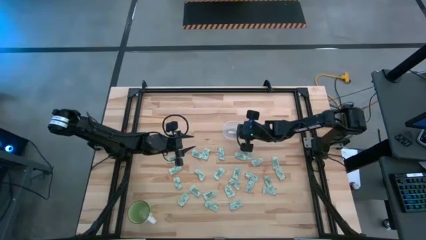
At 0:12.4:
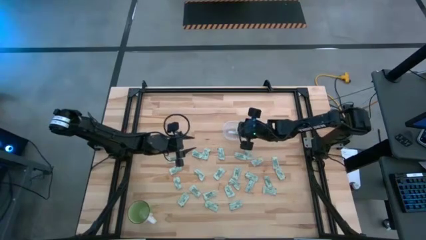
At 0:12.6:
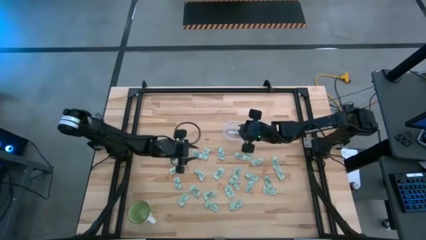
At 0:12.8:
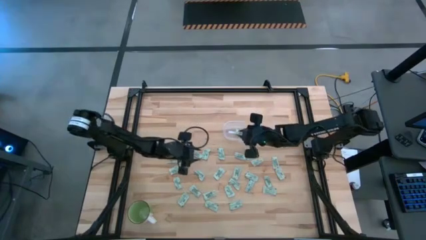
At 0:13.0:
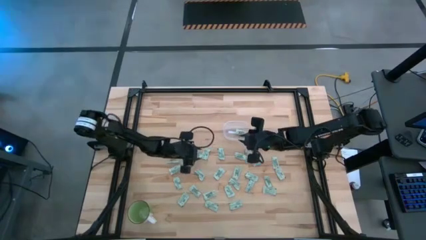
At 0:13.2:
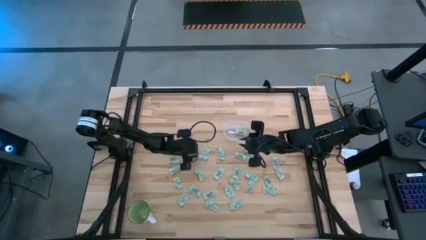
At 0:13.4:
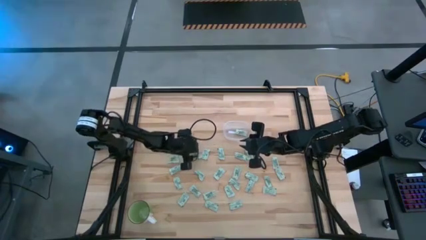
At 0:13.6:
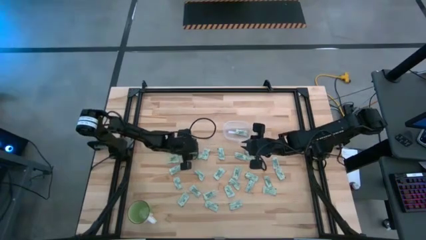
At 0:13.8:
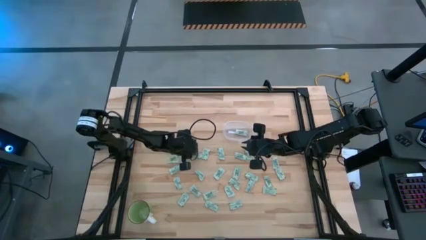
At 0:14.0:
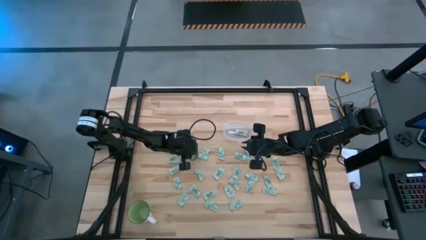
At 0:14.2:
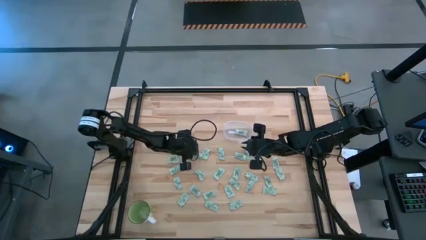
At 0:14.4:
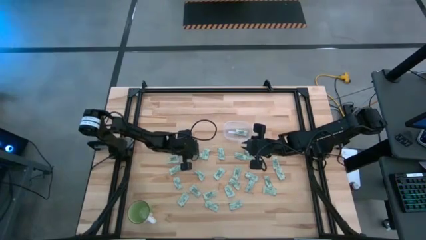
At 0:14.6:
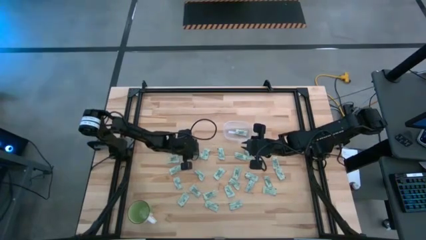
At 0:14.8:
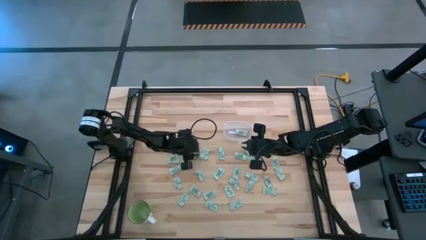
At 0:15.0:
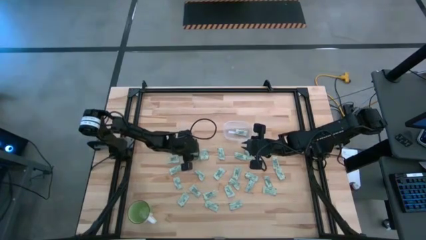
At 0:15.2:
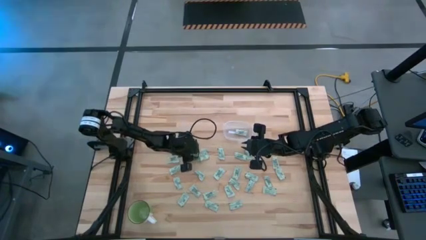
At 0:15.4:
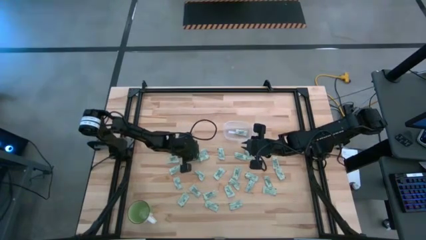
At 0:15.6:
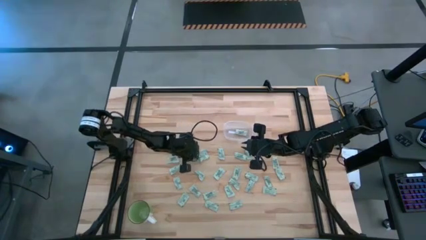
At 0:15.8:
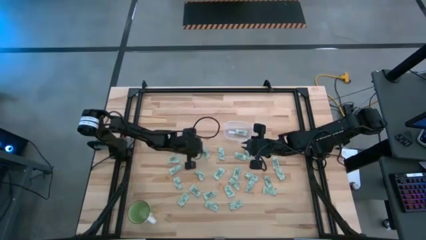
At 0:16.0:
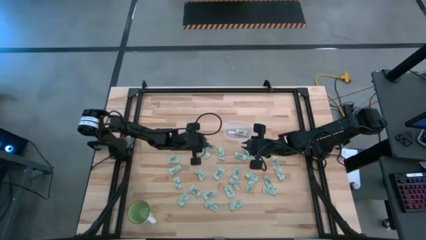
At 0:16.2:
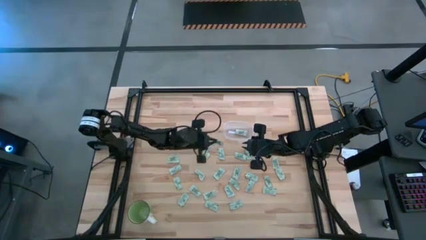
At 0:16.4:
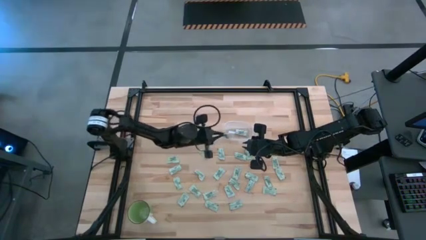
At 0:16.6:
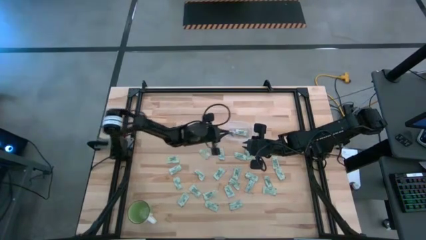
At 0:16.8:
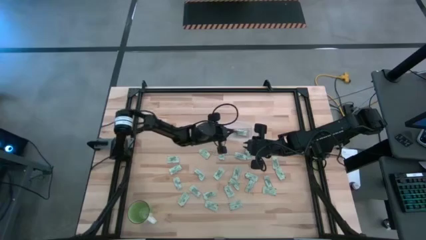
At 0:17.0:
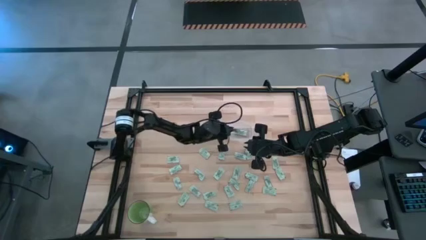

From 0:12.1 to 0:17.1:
Task: Pick and place Stevia / Truvia into bins
Put the stevia packet into the transparent bin

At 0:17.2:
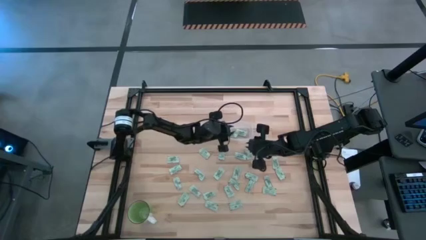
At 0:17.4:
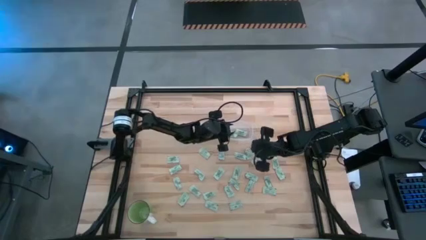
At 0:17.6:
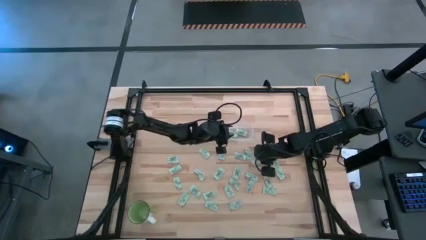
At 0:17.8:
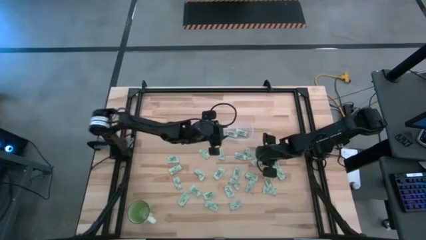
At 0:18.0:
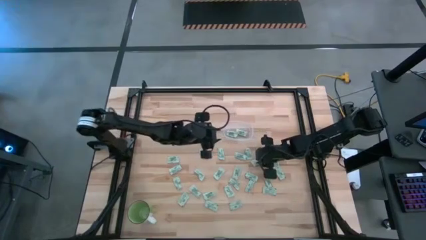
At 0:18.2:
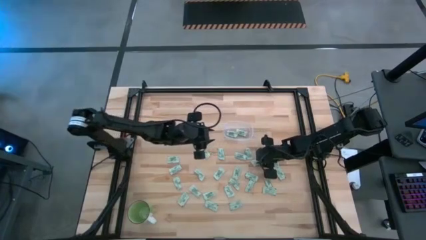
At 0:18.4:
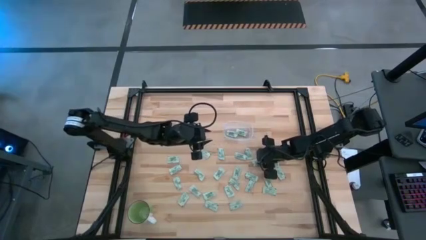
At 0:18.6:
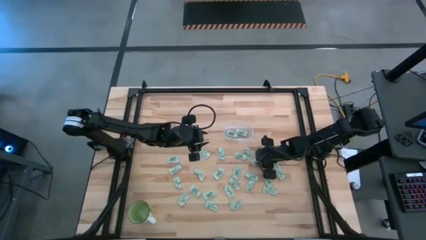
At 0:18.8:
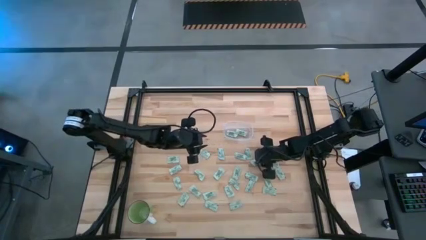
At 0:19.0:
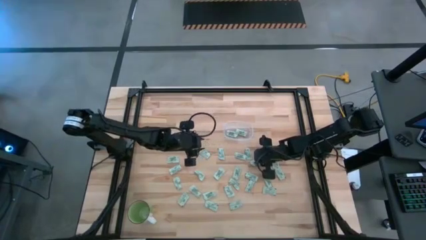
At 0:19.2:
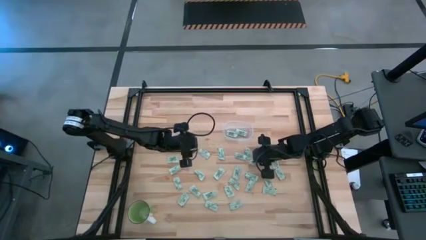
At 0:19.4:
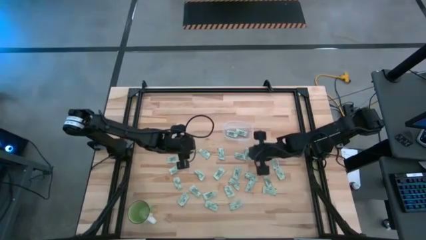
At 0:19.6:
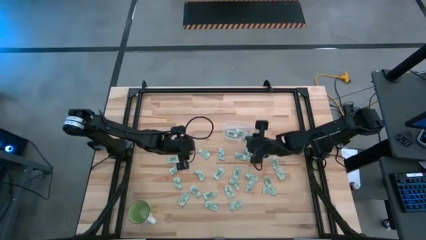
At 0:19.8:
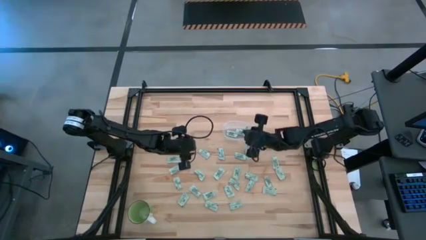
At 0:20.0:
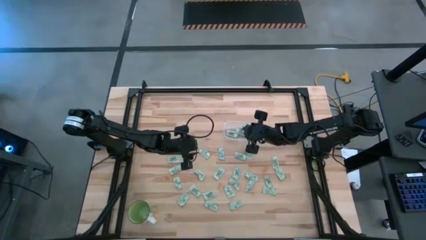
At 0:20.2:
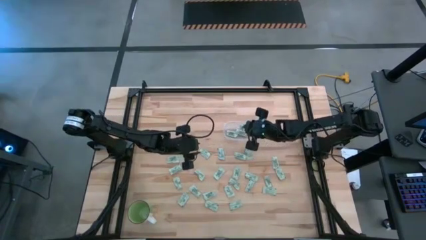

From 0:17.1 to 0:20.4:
Put the stevia packet into the transparent bin

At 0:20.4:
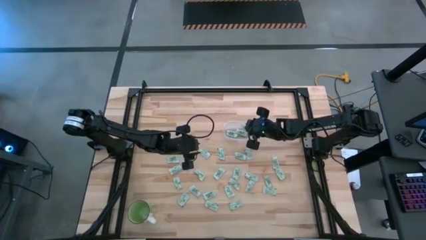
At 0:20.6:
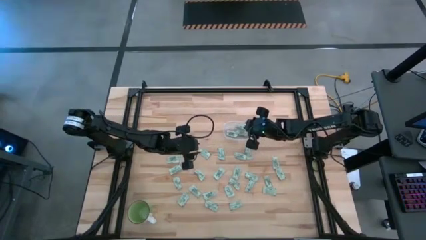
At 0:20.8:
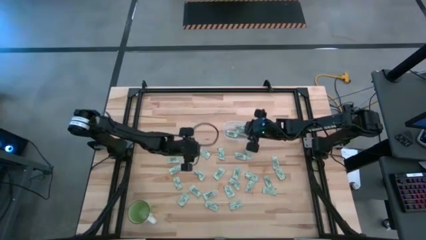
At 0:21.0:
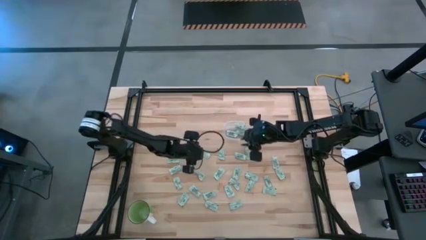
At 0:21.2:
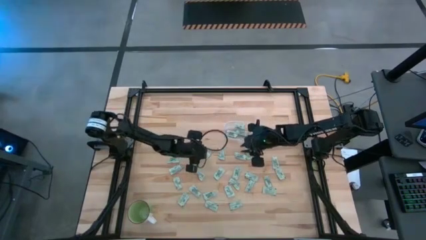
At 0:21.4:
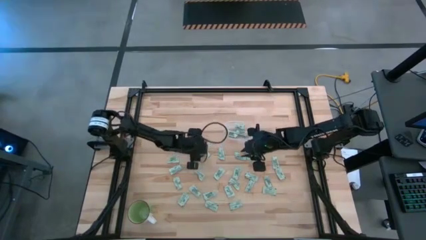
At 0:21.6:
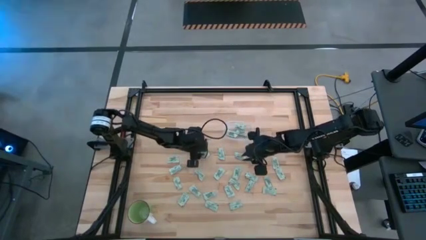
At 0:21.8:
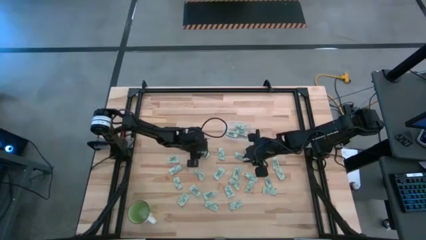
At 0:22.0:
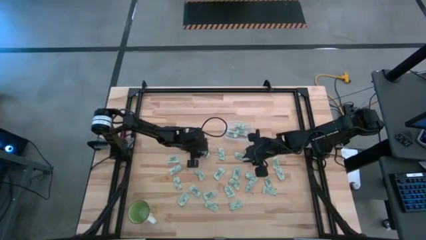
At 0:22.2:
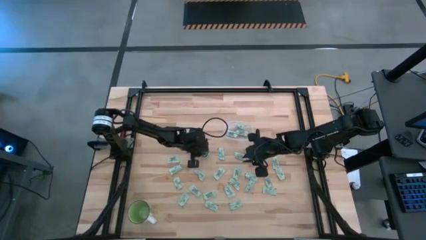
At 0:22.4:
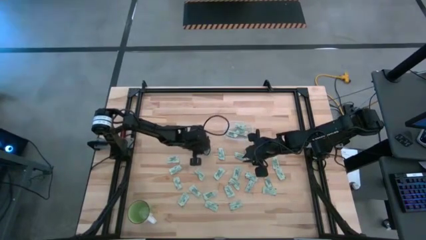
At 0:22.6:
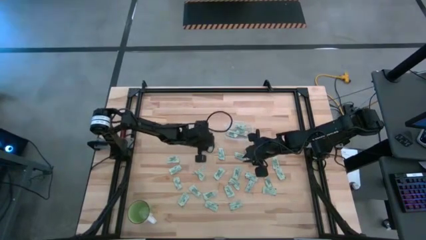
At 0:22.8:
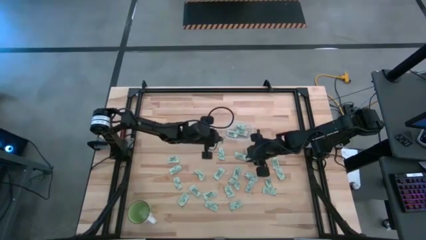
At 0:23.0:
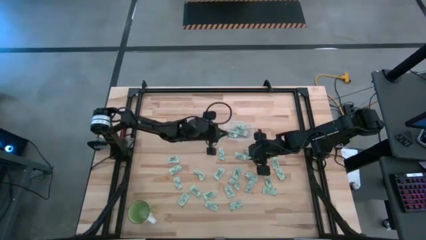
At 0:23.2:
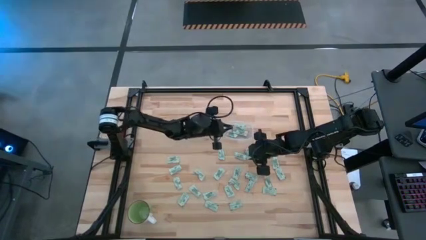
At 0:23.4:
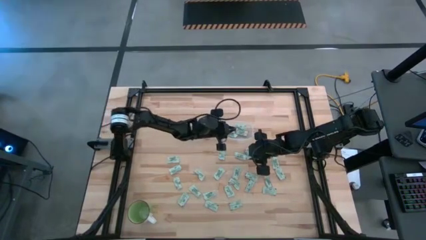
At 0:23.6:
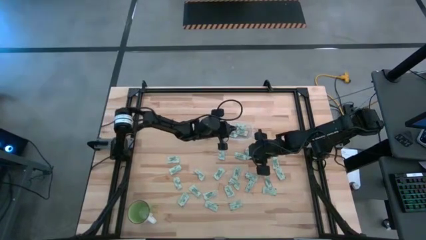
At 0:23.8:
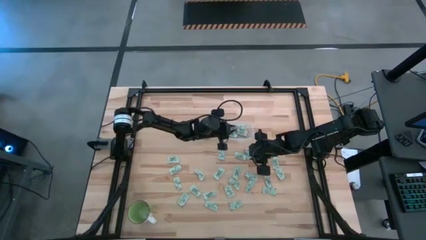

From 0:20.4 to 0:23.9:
Put the stevia packet into the transparent bin

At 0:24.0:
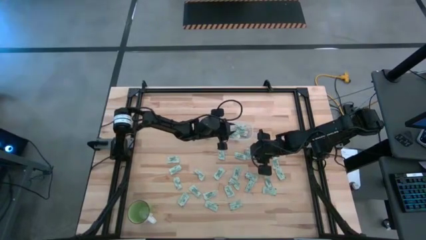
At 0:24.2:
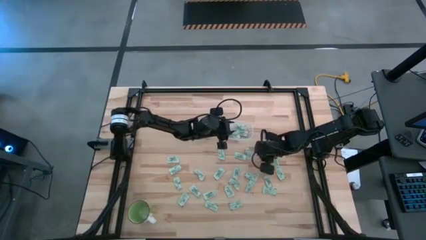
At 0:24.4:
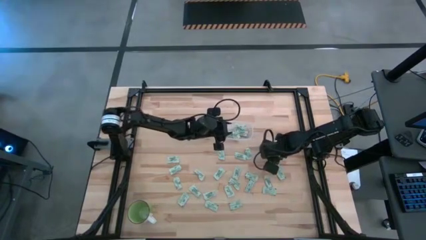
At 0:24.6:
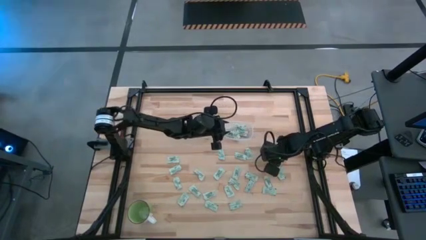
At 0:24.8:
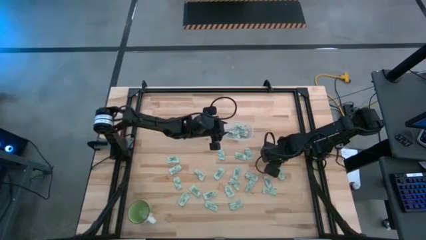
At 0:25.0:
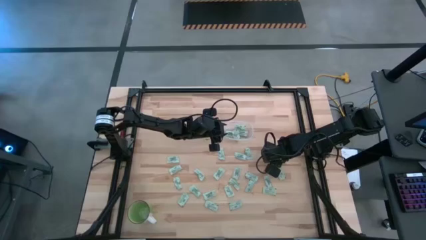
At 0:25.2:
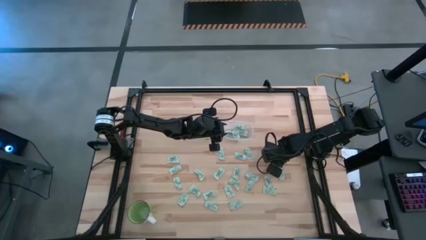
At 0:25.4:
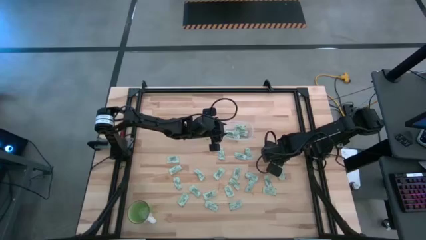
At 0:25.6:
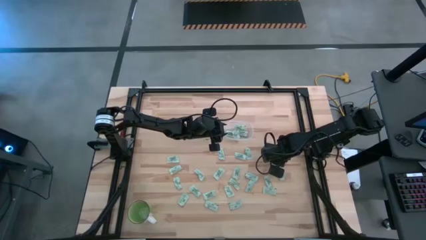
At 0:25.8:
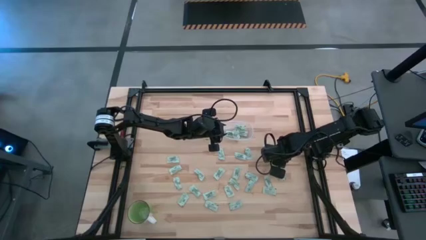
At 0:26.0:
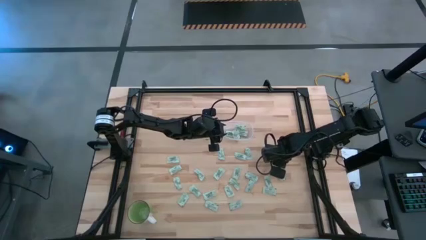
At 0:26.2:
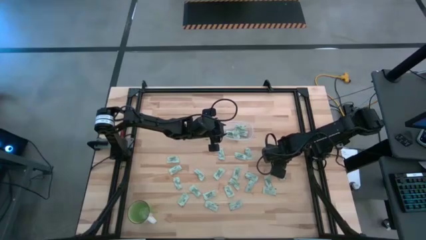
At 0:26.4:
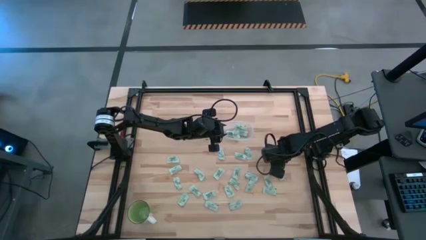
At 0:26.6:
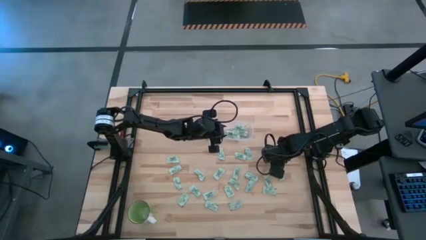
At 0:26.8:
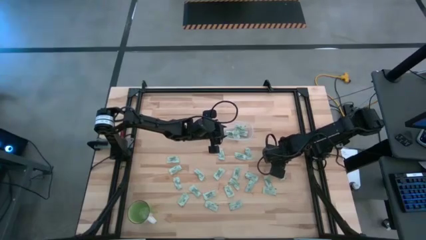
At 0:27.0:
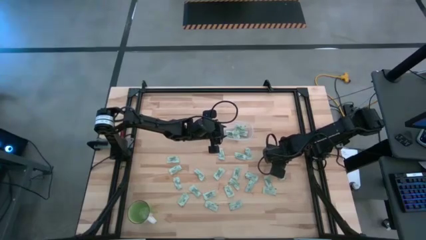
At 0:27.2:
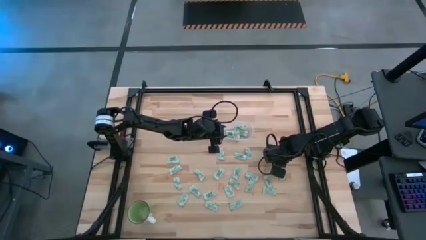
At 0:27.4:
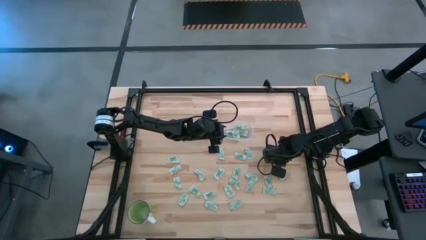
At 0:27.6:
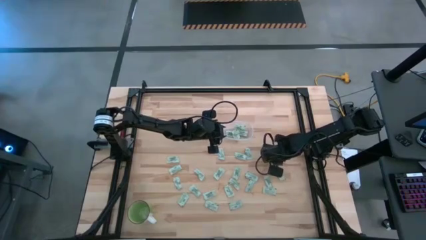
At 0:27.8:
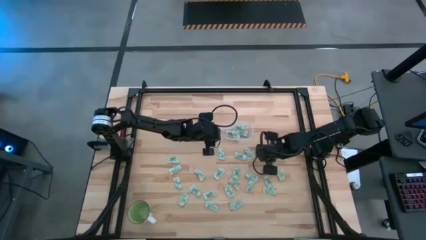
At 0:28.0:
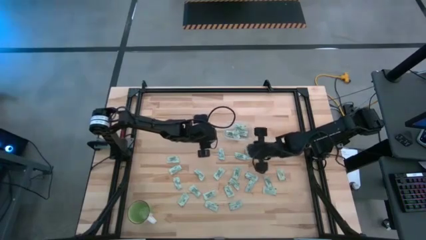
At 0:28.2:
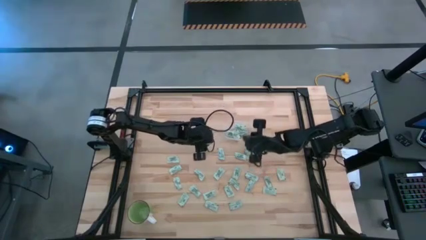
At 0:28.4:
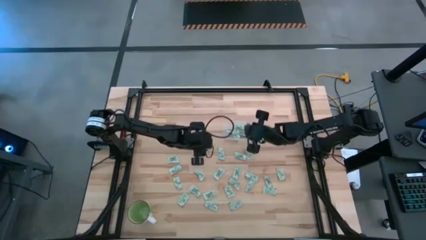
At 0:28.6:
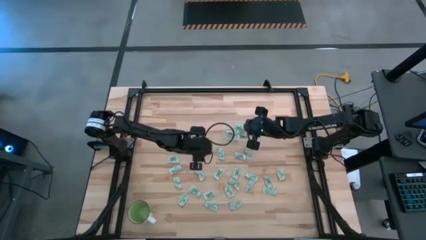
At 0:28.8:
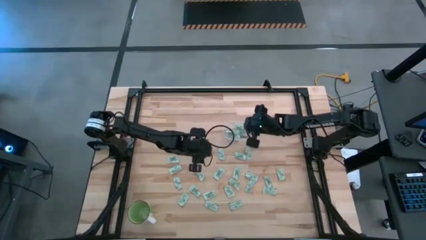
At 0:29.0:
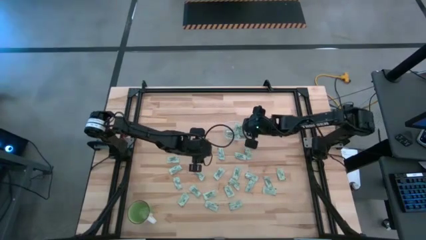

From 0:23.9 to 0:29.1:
Put the stevia packet into the transparent bin
